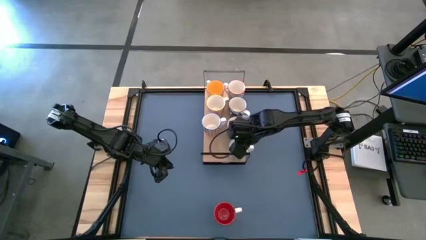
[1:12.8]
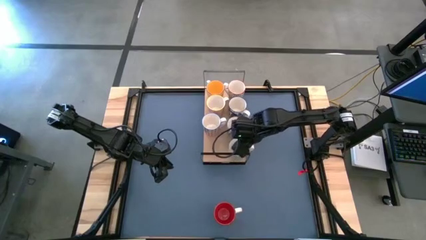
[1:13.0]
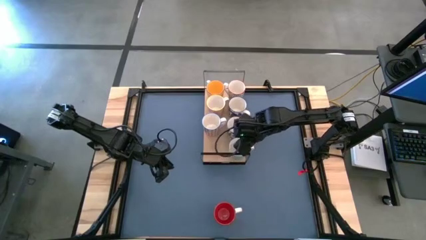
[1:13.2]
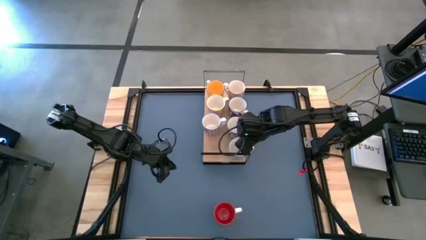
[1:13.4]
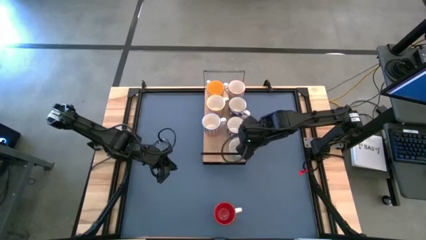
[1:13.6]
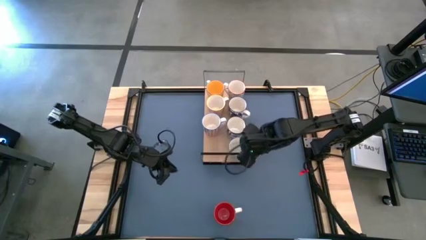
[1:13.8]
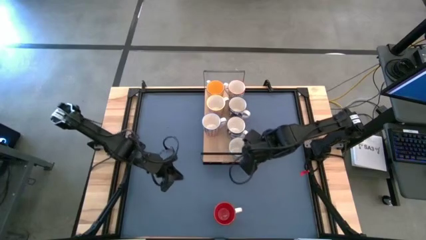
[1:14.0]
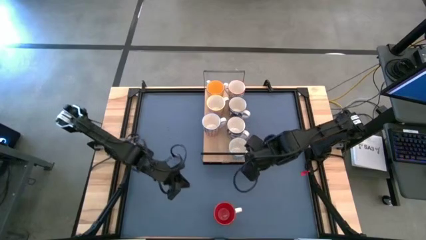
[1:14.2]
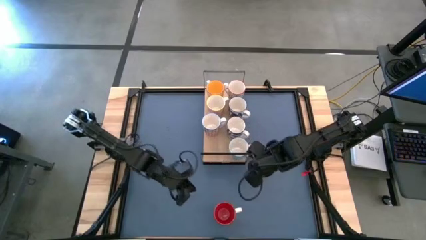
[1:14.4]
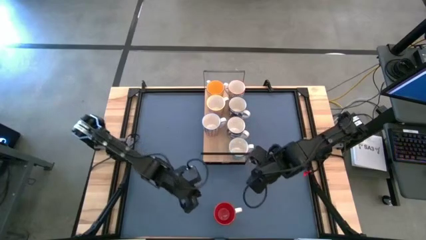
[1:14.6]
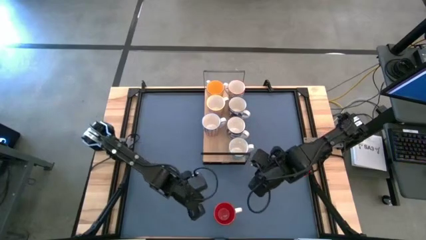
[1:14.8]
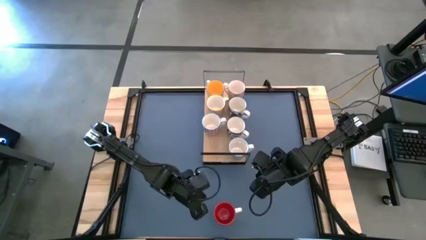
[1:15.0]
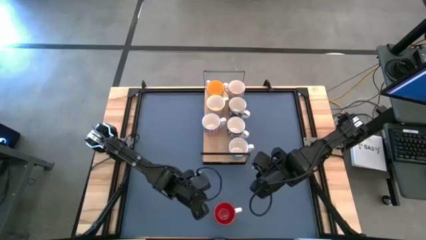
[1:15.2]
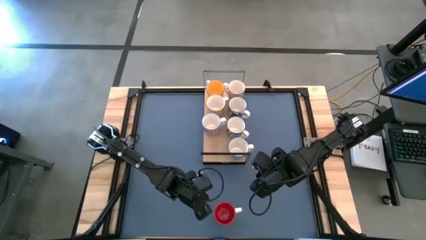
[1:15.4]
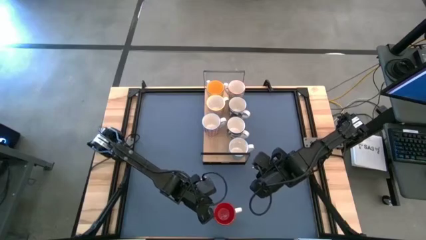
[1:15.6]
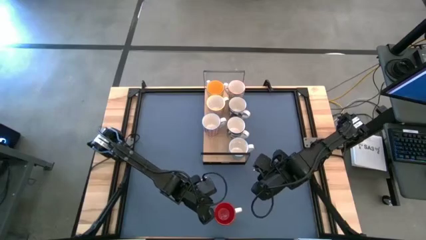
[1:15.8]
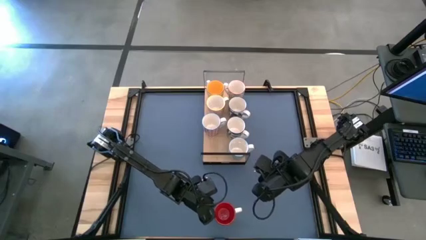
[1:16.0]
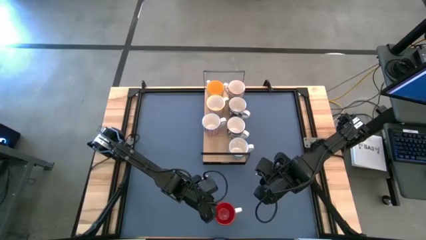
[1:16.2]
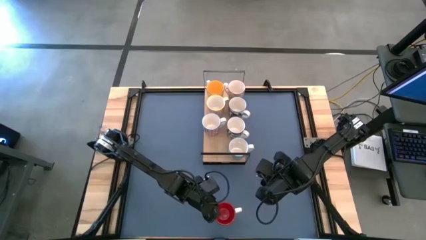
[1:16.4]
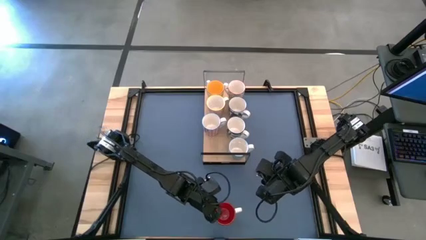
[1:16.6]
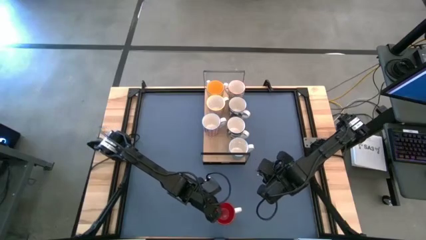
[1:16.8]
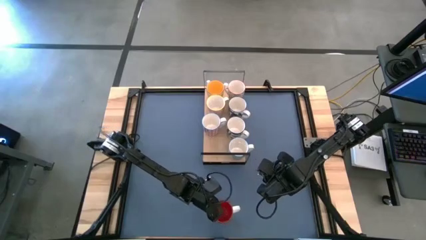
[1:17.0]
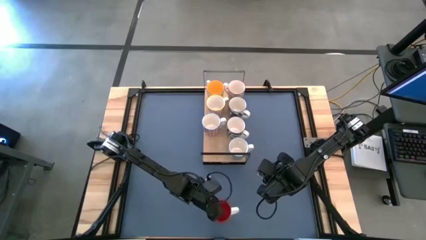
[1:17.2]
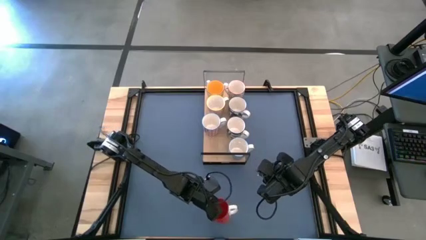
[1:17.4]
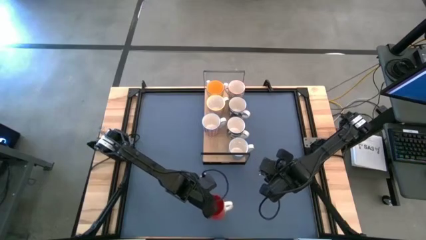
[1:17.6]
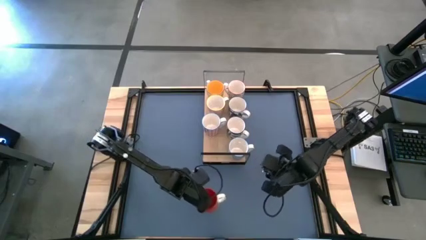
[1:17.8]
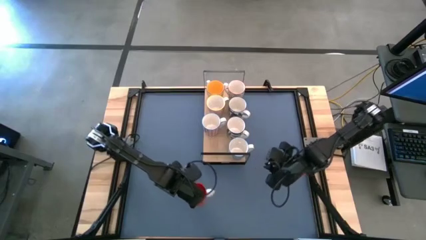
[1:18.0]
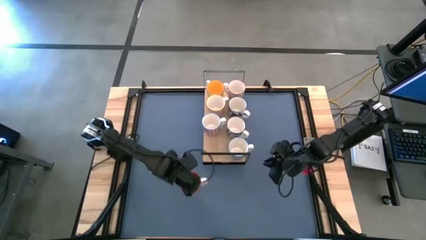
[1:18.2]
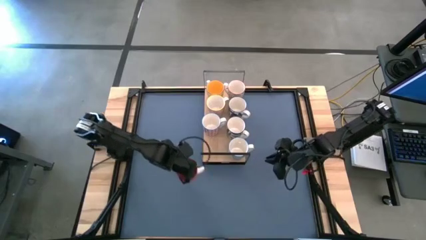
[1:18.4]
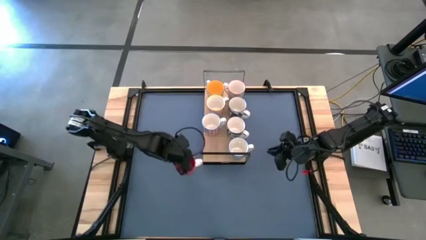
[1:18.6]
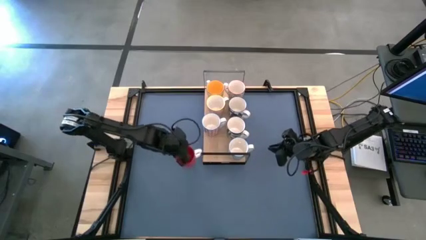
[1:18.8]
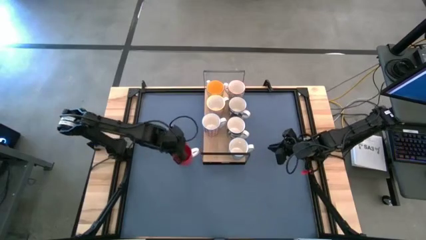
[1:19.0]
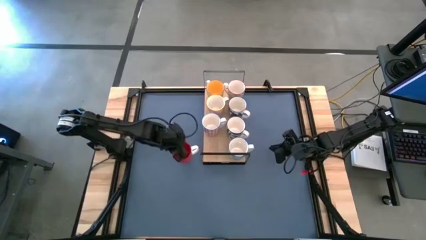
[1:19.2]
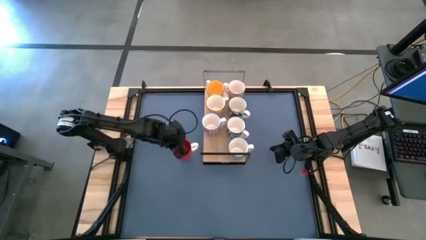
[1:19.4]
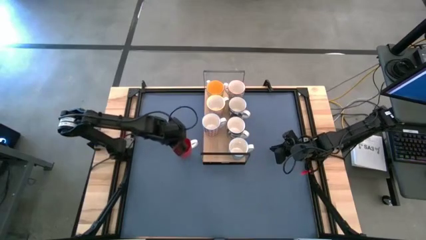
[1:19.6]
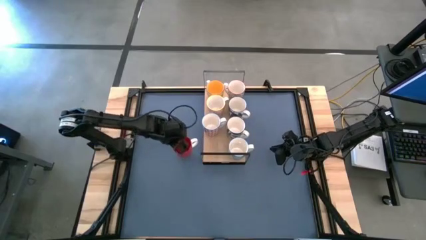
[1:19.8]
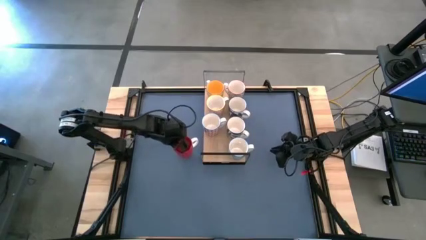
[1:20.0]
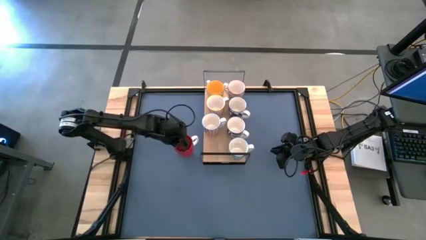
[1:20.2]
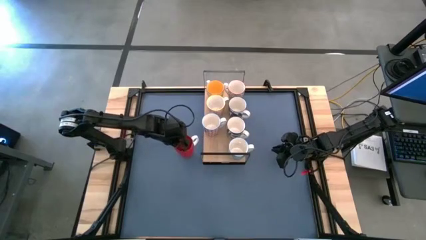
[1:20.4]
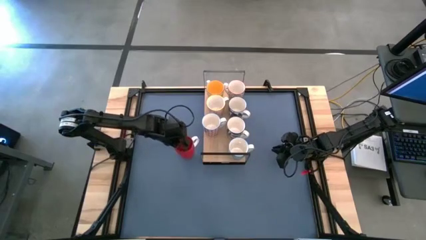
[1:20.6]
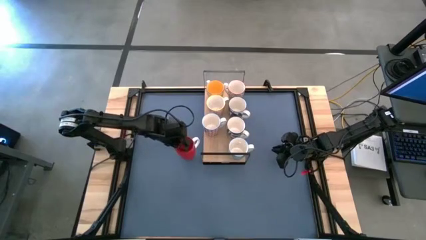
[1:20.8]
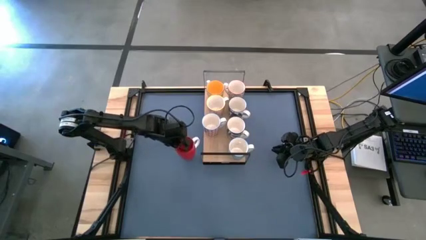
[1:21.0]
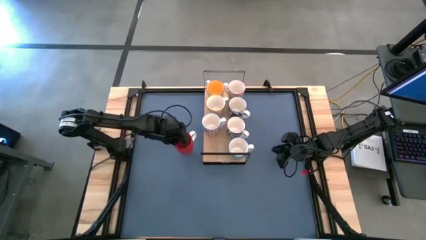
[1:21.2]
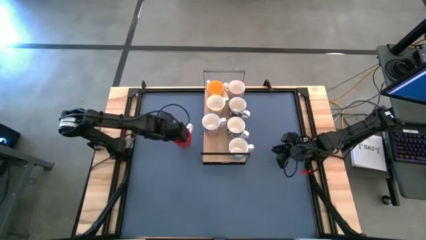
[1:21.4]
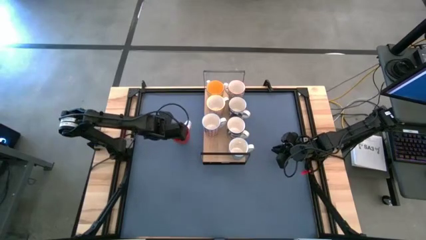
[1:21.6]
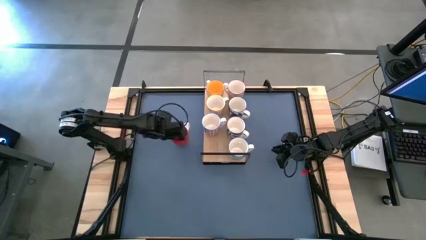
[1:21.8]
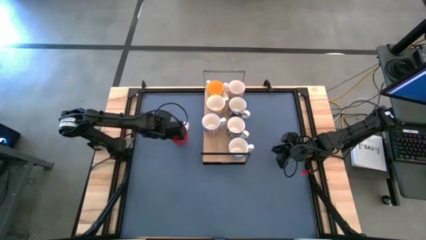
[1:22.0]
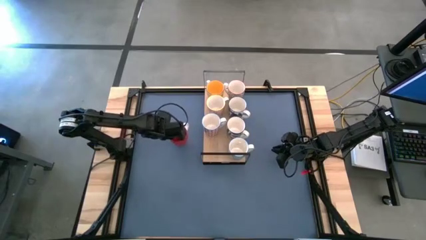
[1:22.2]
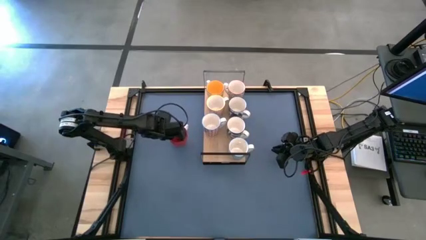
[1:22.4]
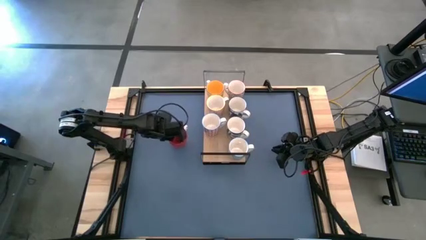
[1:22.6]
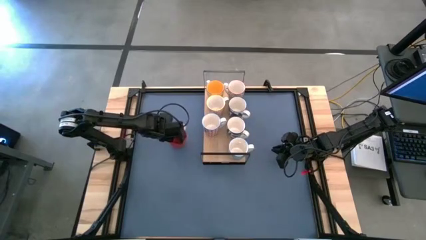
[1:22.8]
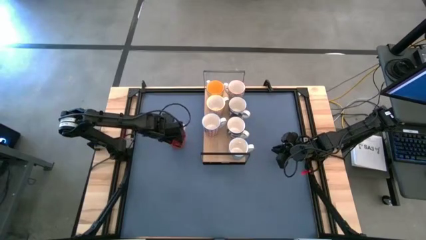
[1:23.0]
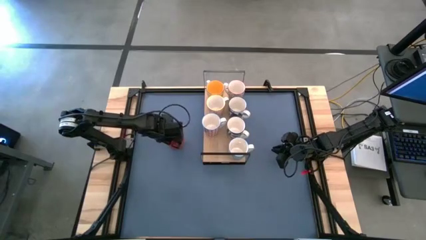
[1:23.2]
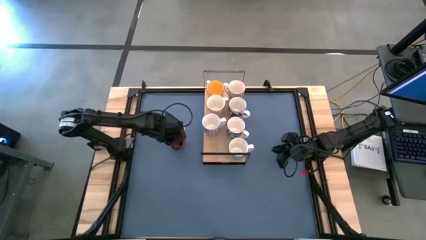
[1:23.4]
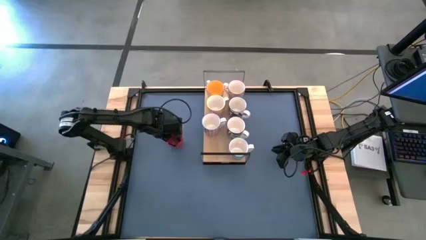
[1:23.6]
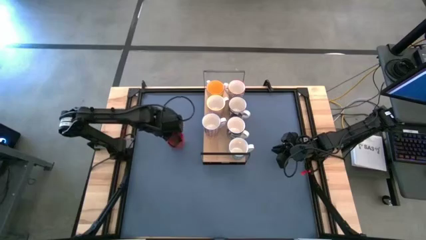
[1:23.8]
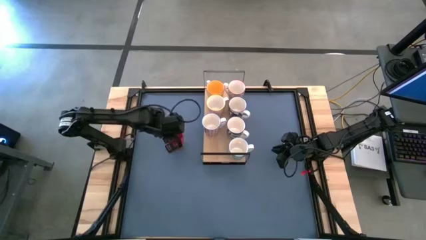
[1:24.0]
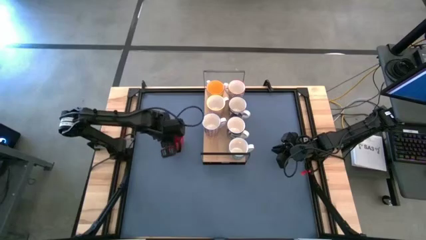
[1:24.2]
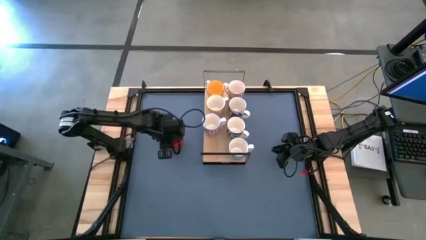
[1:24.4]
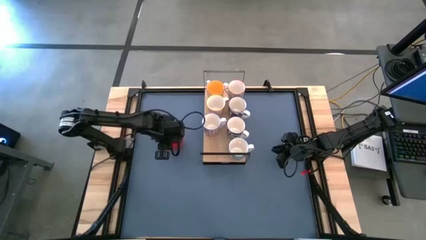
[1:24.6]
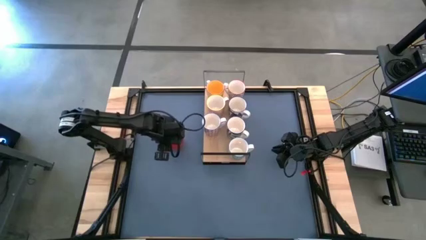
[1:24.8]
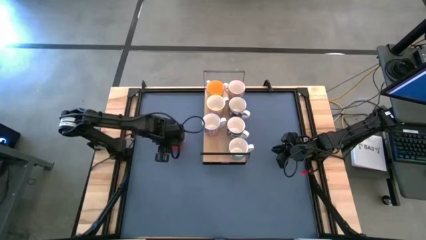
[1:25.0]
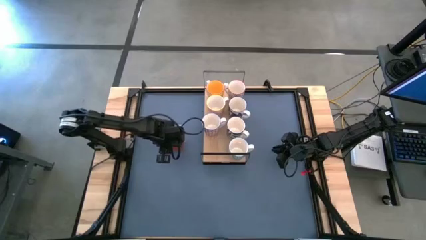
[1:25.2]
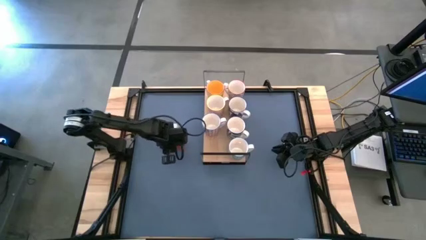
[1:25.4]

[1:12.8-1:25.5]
Task: Place coffee mugs
Put the red mug on the shelf
